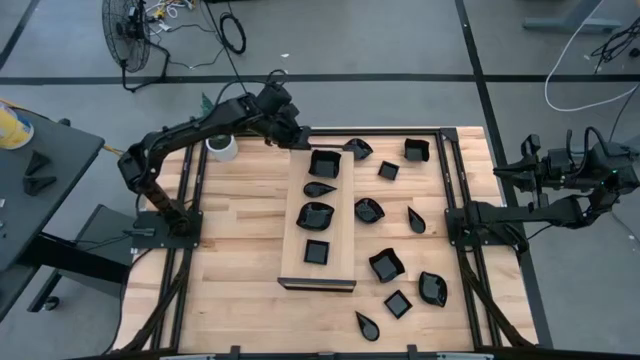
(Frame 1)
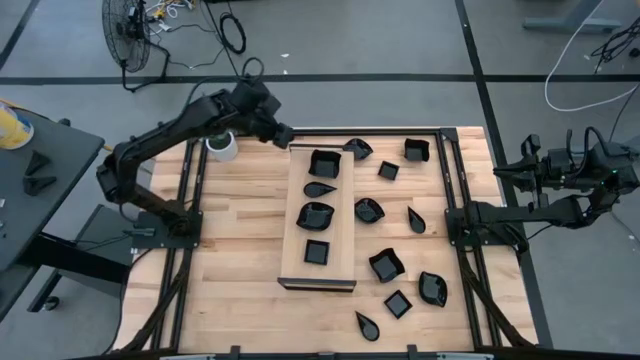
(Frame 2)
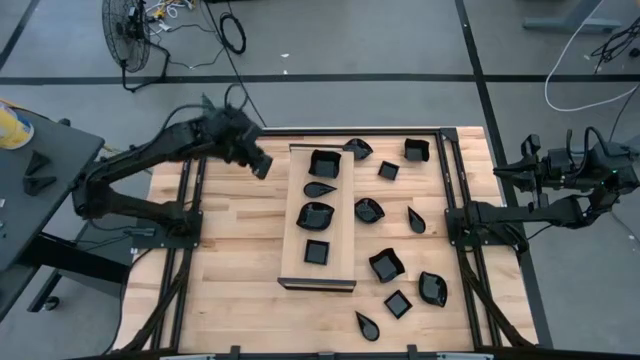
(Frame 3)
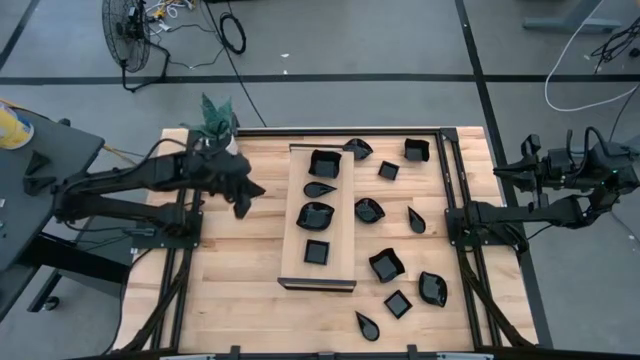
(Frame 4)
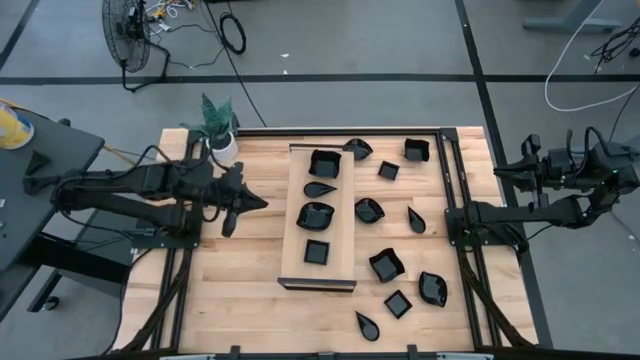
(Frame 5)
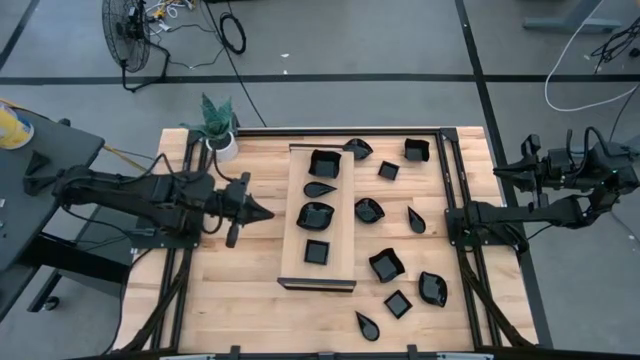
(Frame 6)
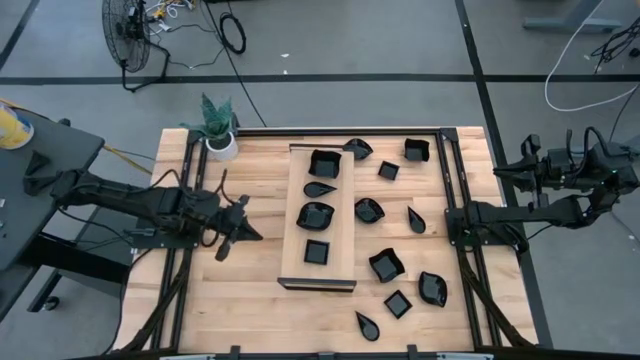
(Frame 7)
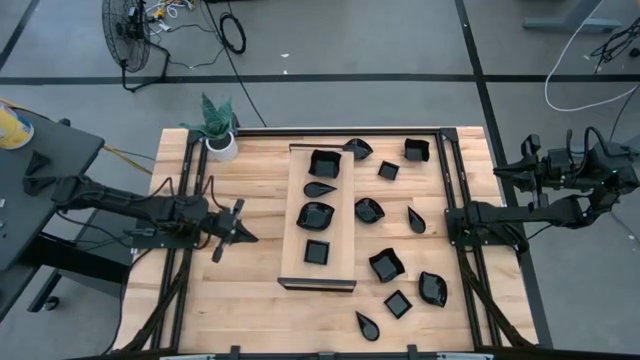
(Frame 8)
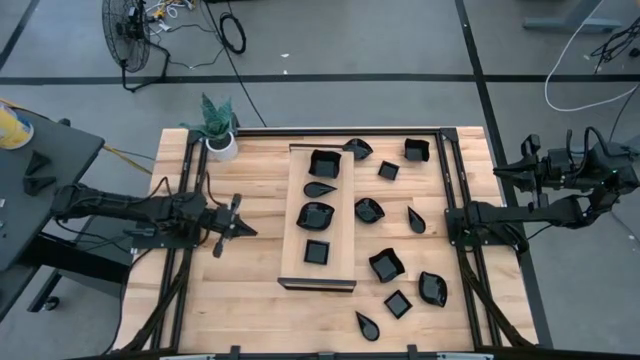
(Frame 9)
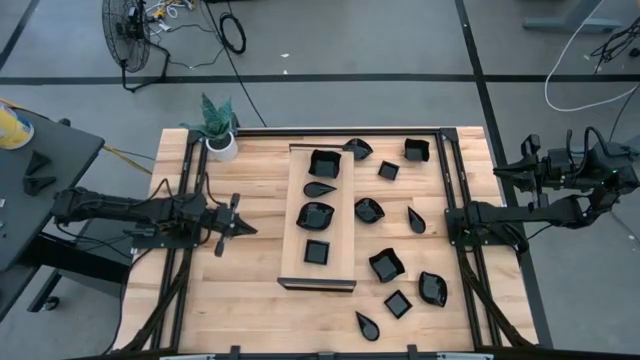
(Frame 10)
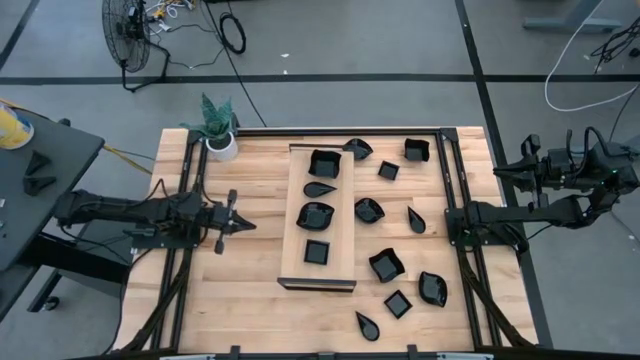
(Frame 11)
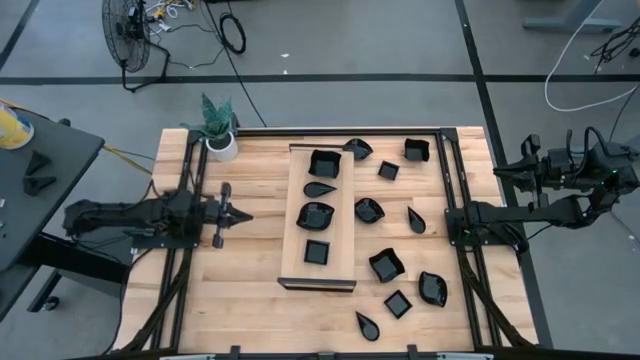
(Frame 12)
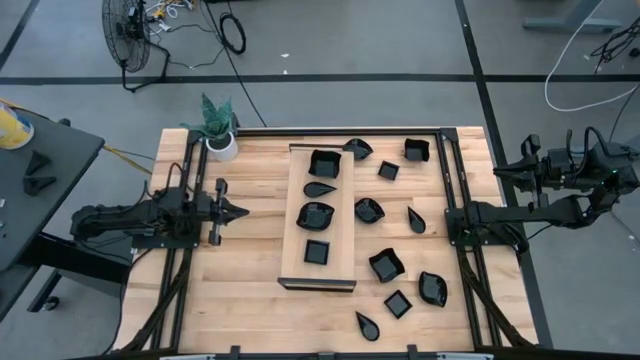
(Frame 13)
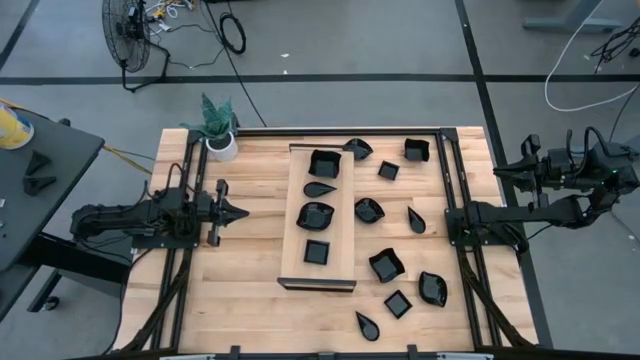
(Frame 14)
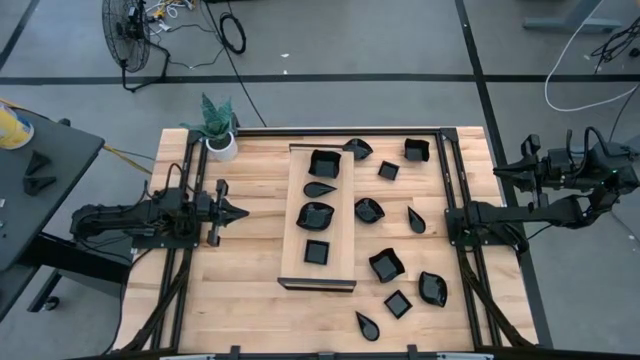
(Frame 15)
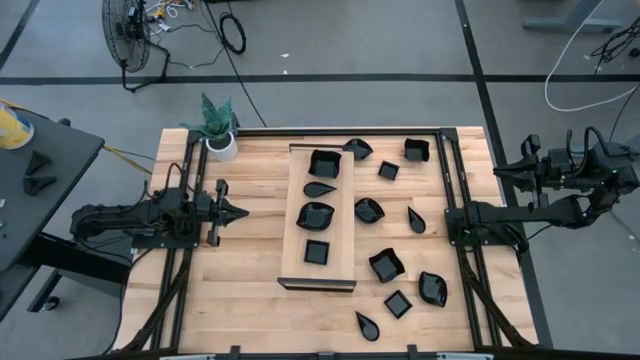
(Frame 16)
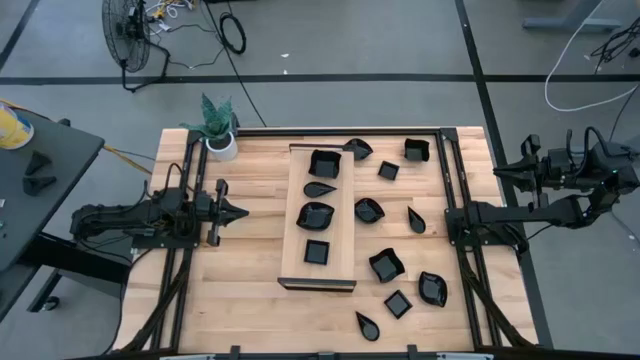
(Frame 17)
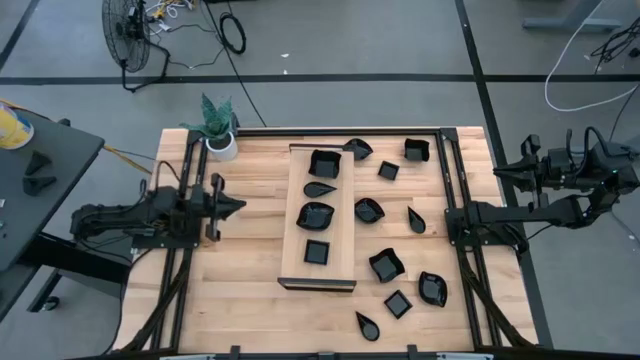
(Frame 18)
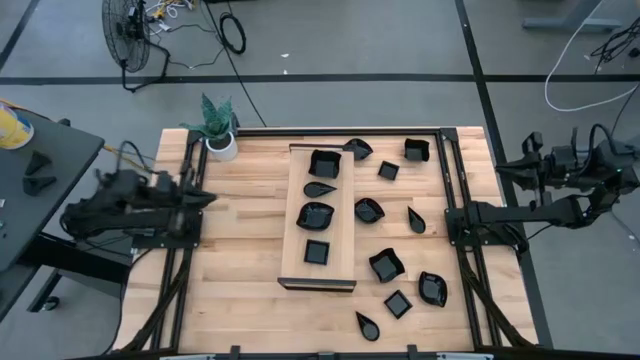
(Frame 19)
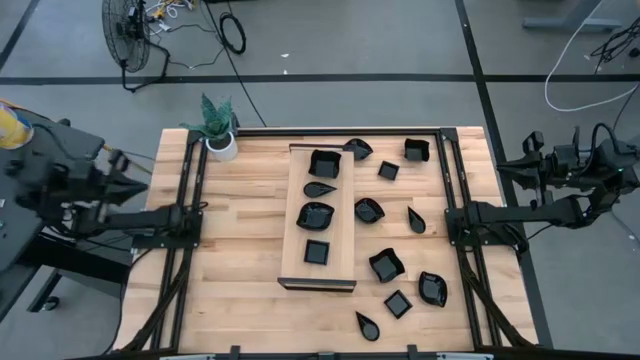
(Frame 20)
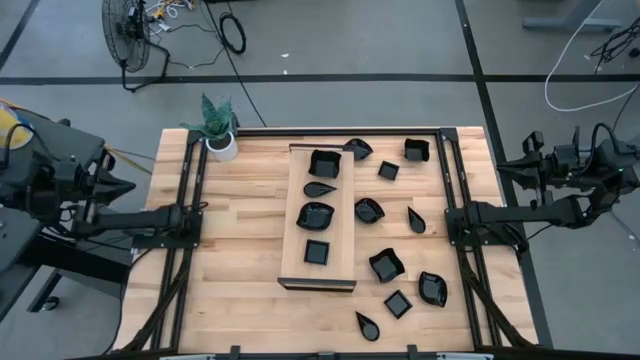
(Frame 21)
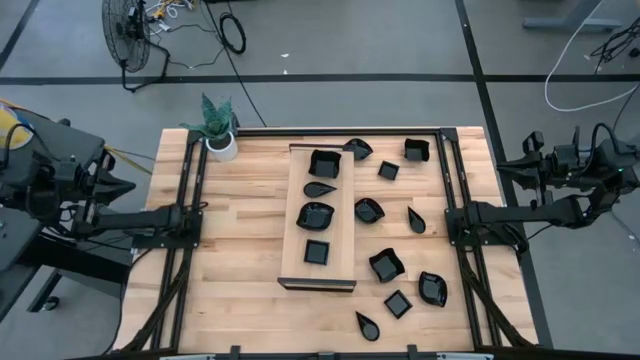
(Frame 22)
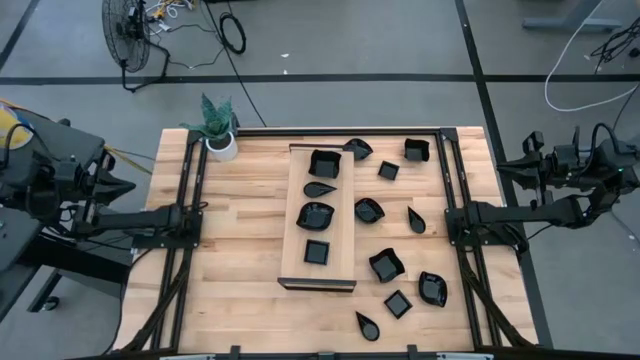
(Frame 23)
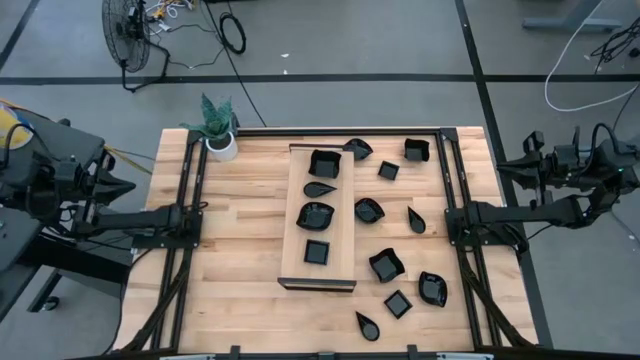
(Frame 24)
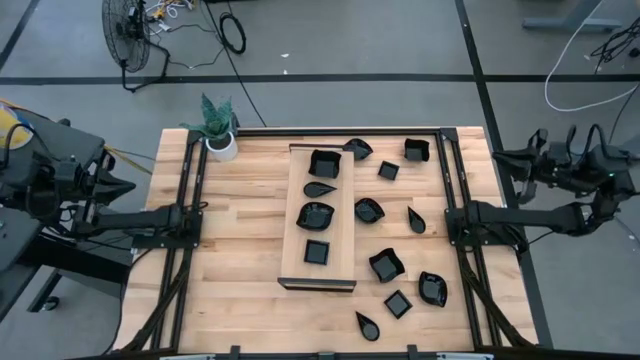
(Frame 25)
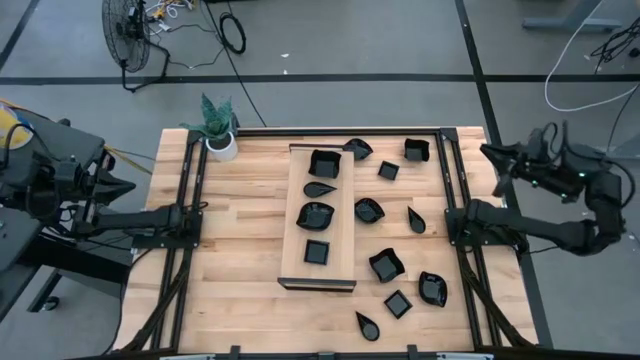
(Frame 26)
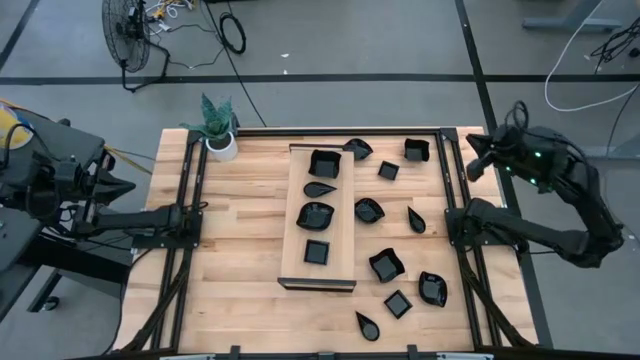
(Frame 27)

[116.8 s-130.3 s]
Task: Pick & Place Mini shaped plates
Stack the distorted square plate on top of the distorted square plate on the shelf

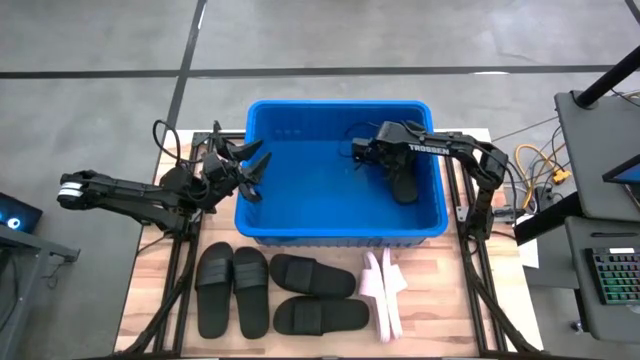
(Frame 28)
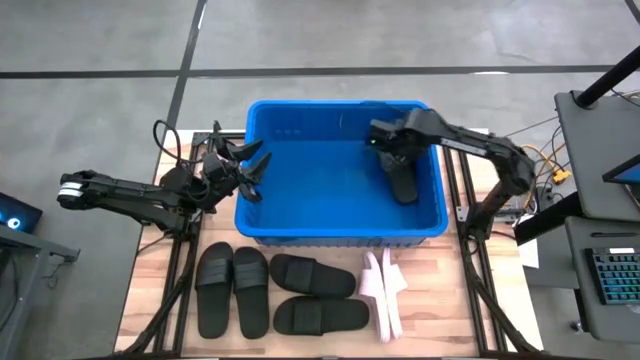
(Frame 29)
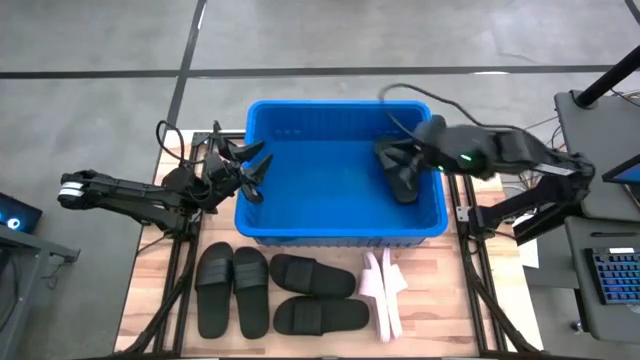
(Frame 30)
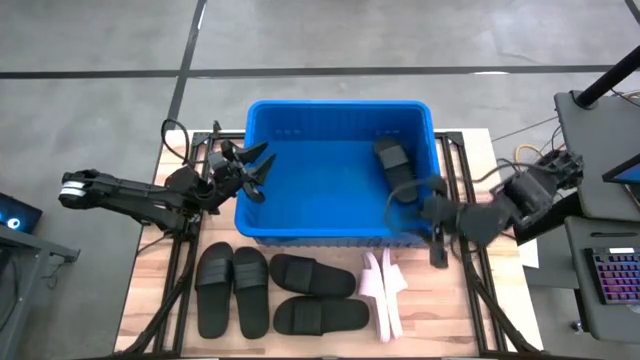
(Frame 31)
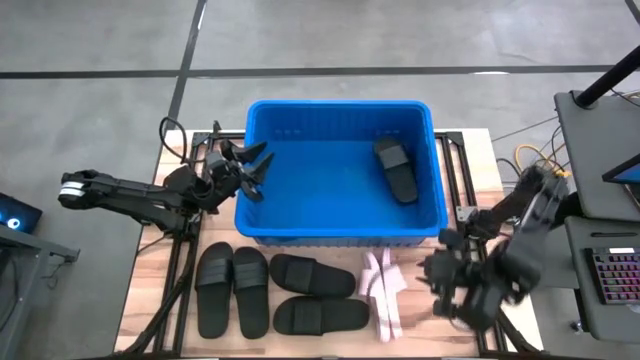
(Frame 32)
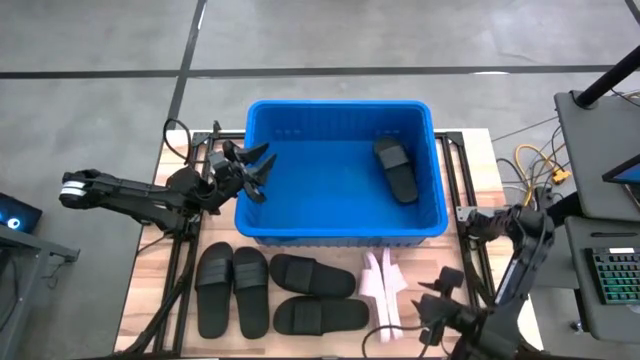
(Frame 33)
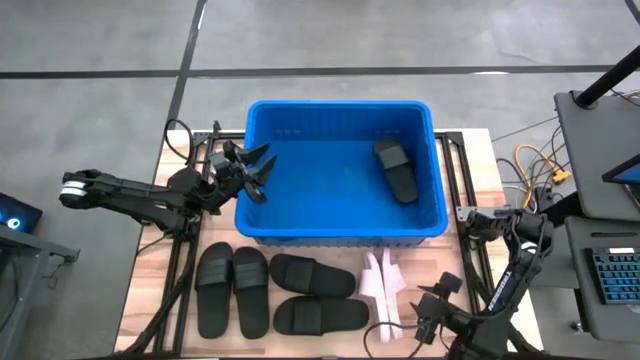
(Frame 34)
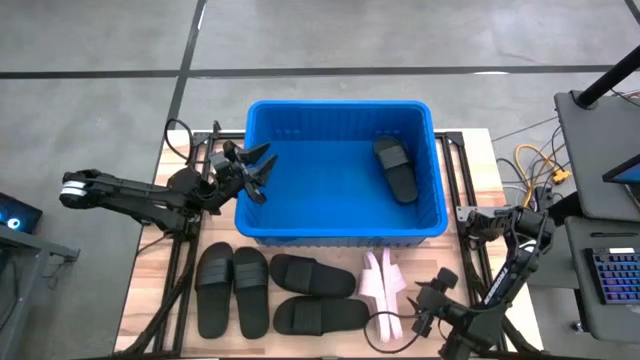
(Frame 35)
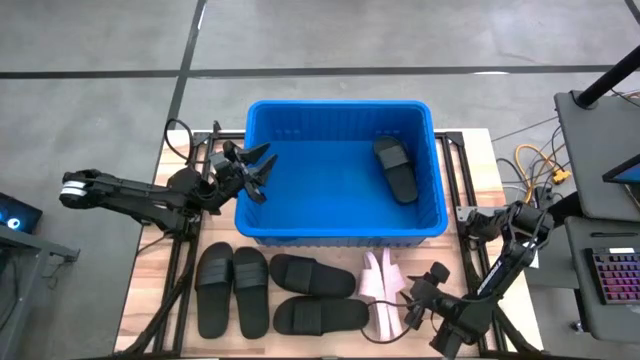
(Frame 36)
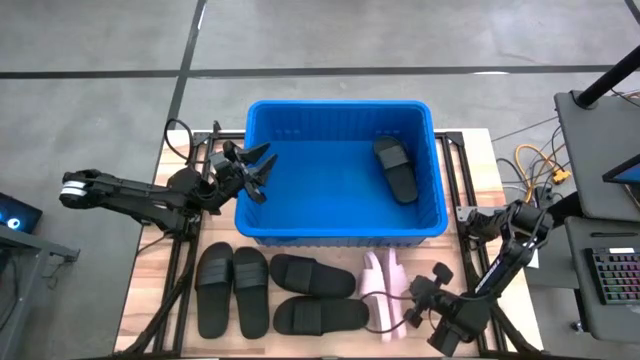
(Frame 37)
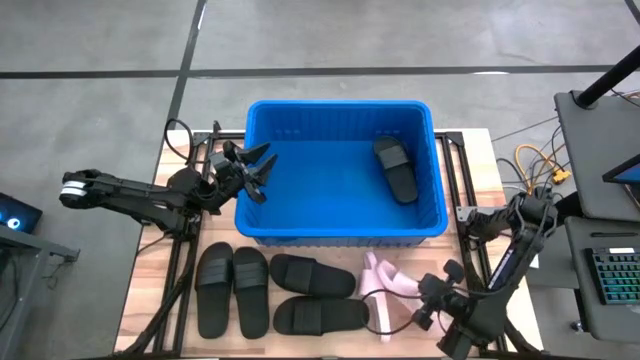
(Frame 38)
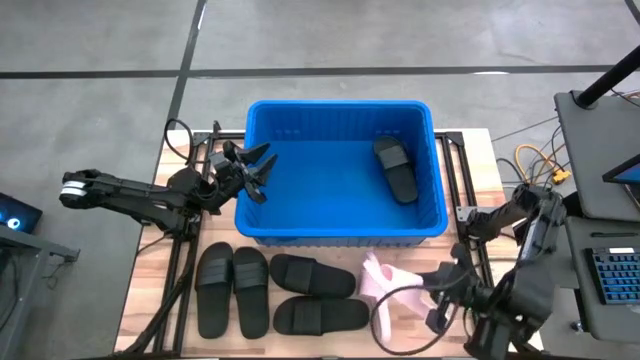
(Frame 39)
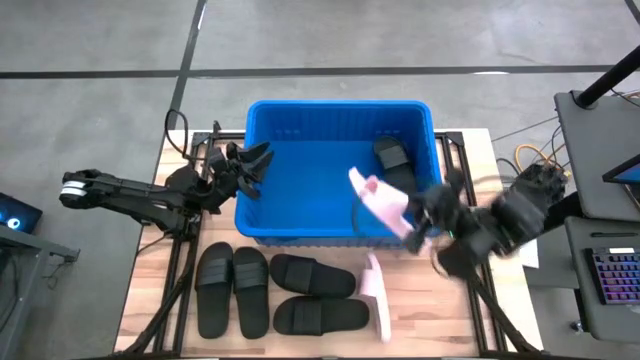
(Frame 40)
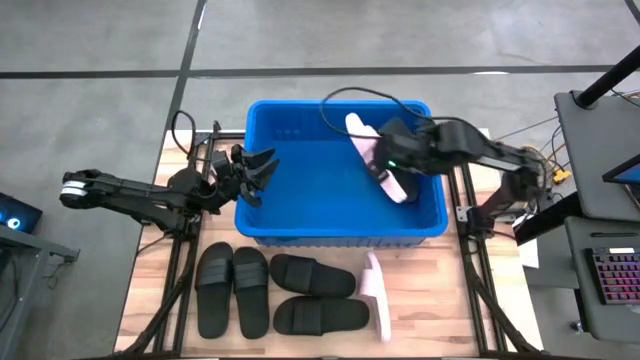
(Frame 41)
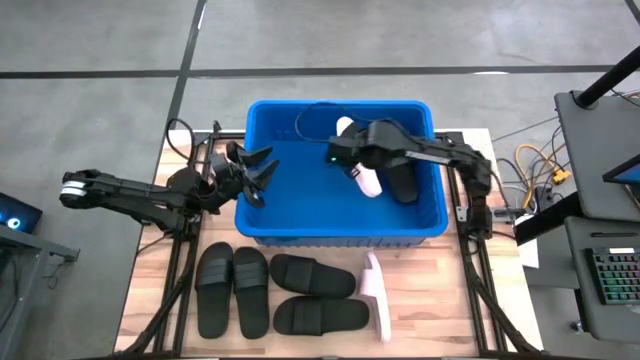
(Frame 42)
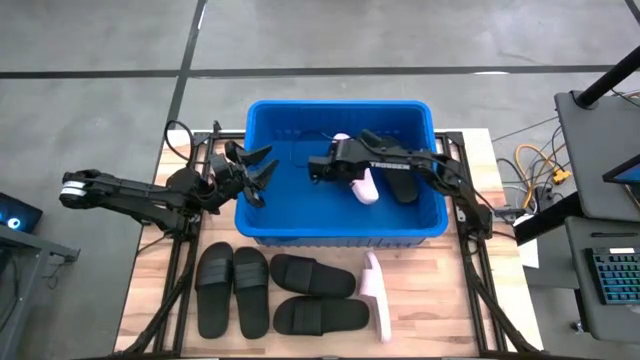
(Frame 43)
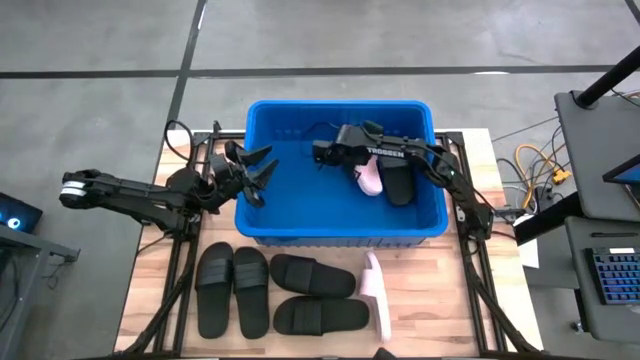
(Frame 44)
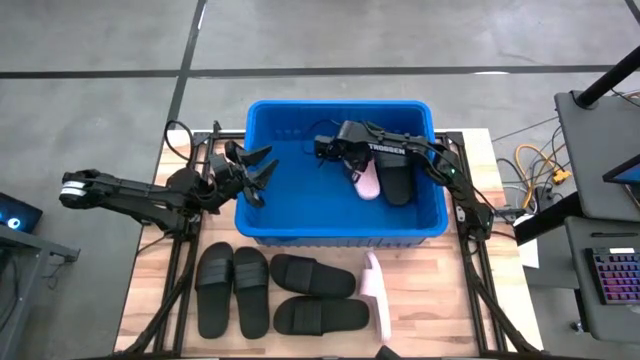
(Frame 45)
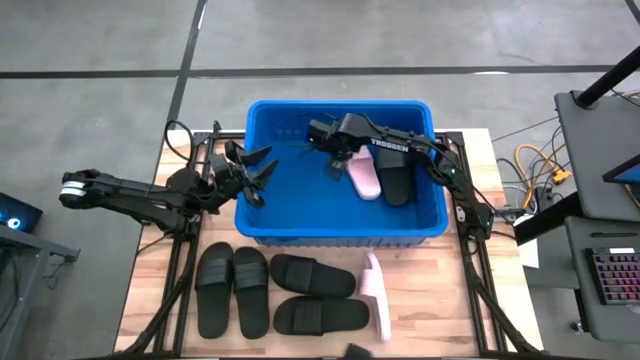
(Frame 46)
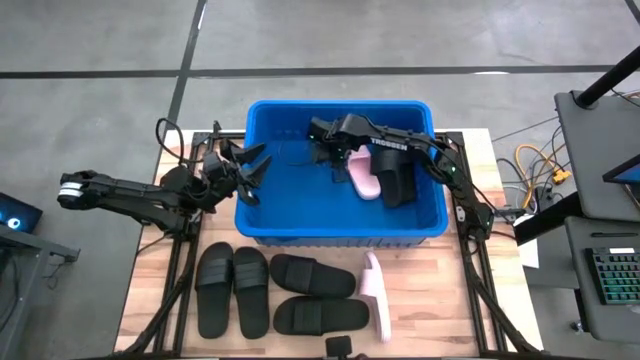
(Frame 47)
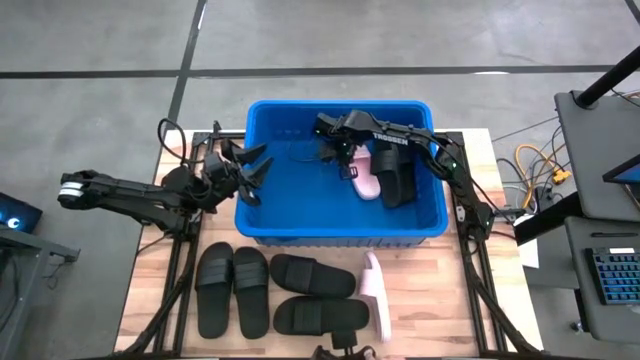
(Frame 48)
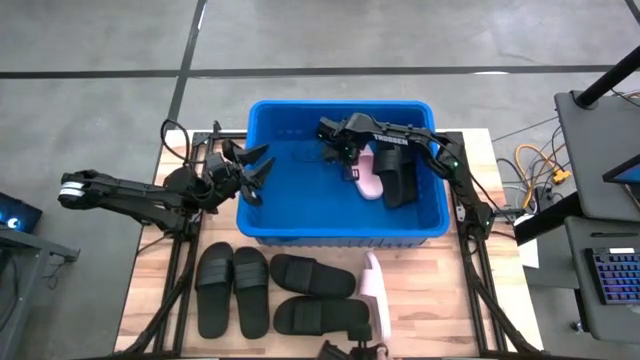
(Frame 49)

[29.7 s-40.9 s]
Task: Pick and place slides into bin
Put the pink slide into the blue container
